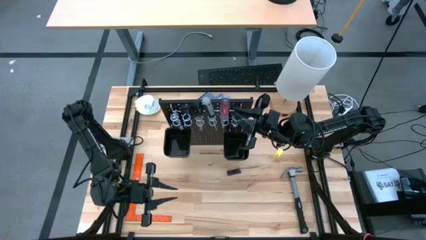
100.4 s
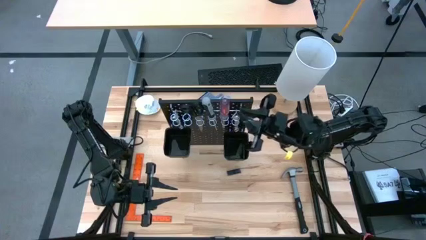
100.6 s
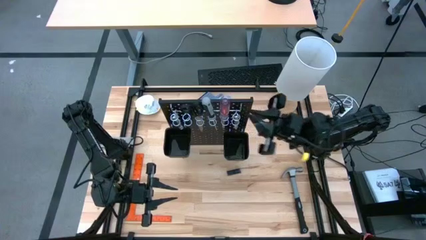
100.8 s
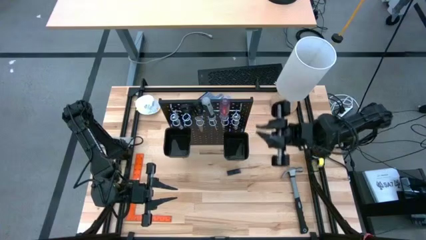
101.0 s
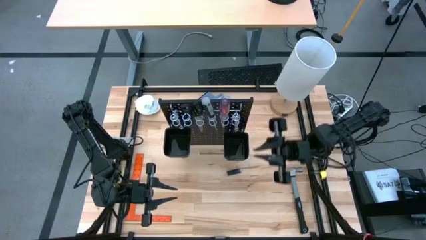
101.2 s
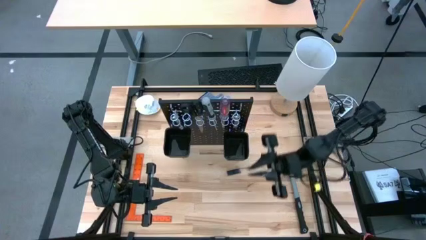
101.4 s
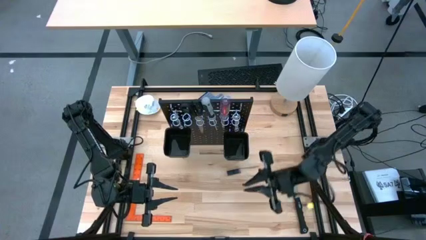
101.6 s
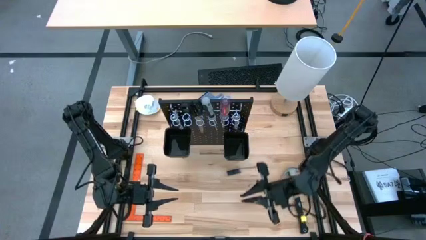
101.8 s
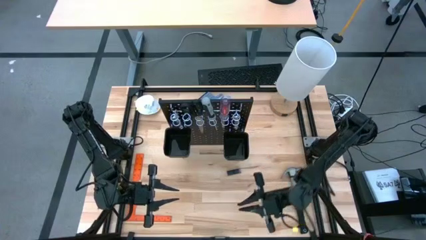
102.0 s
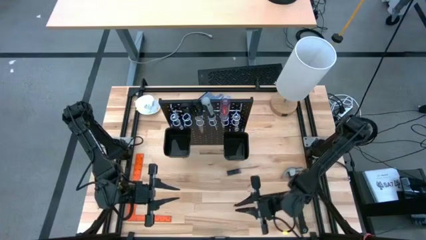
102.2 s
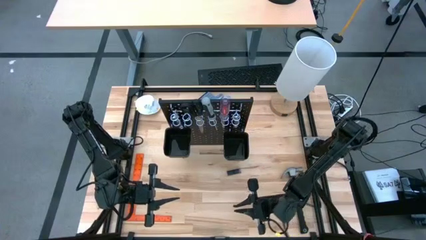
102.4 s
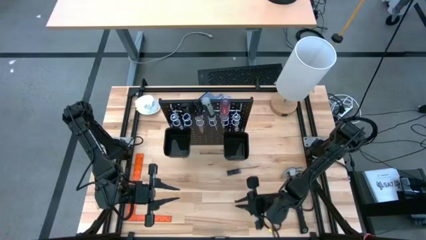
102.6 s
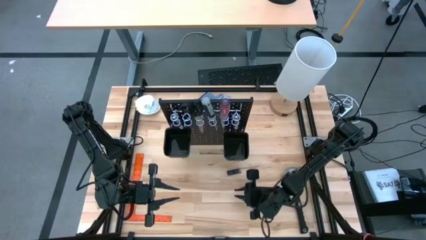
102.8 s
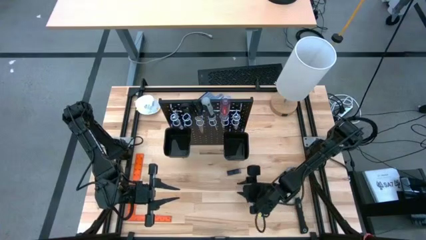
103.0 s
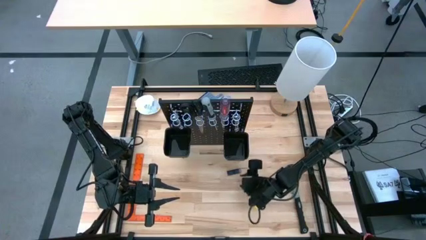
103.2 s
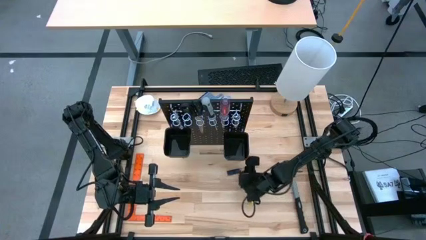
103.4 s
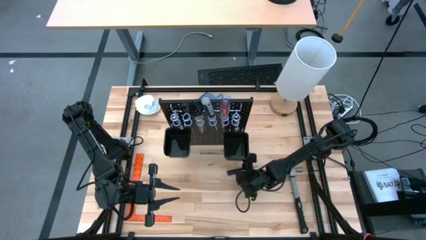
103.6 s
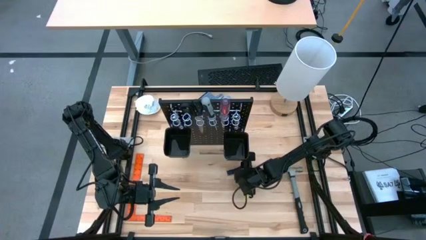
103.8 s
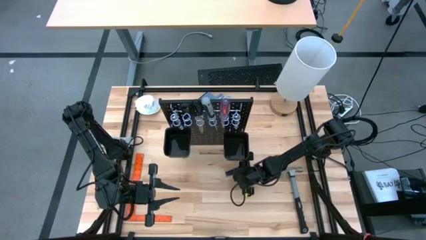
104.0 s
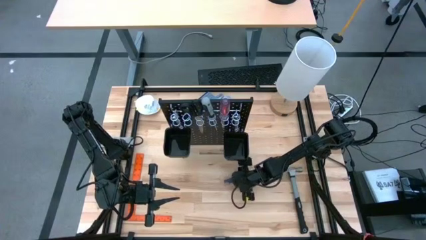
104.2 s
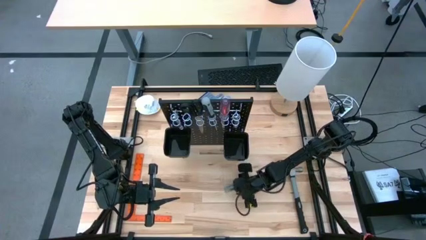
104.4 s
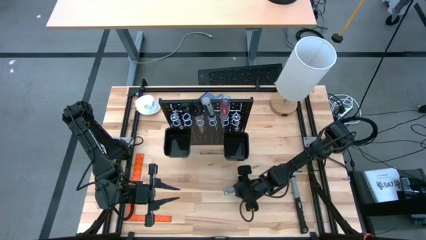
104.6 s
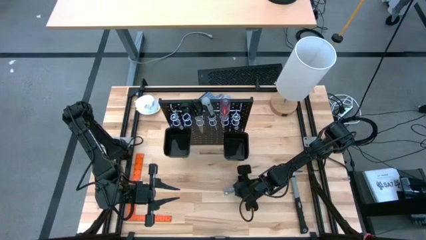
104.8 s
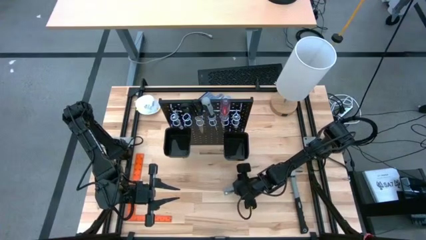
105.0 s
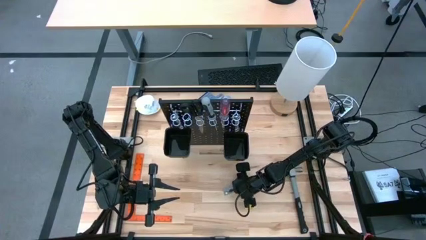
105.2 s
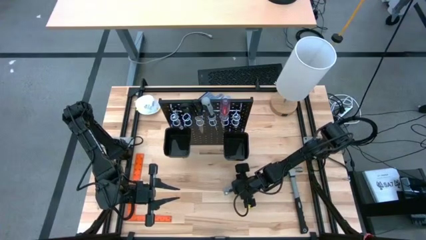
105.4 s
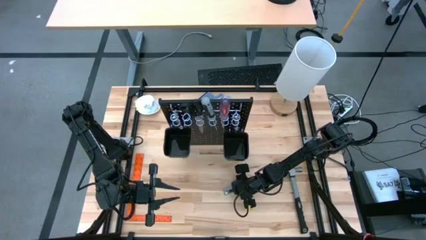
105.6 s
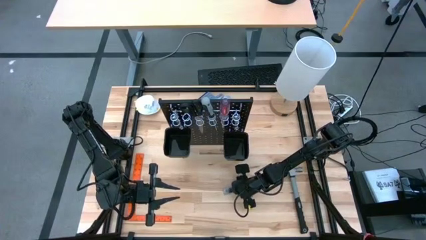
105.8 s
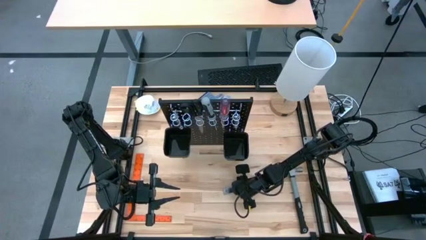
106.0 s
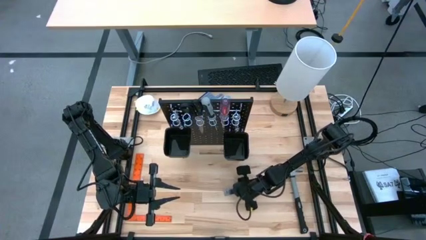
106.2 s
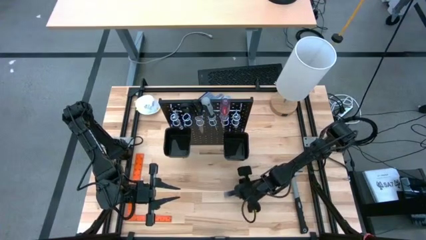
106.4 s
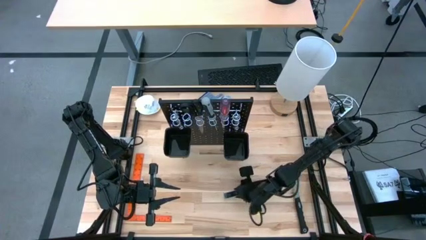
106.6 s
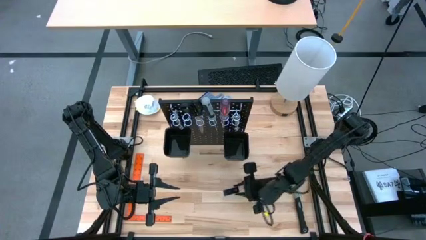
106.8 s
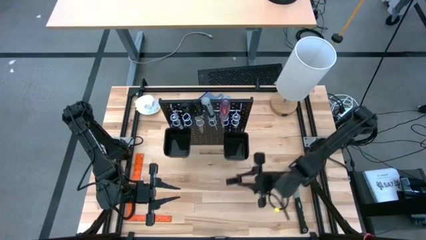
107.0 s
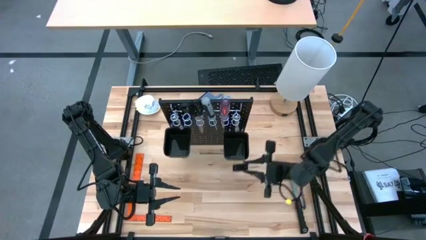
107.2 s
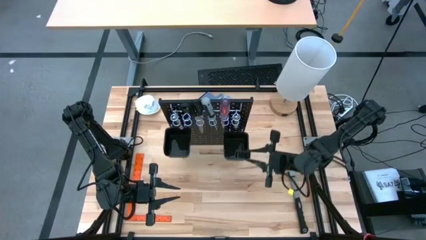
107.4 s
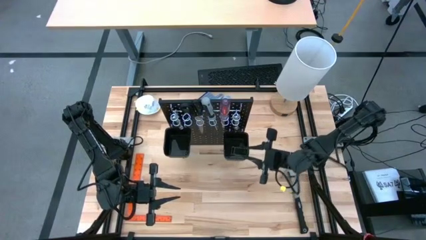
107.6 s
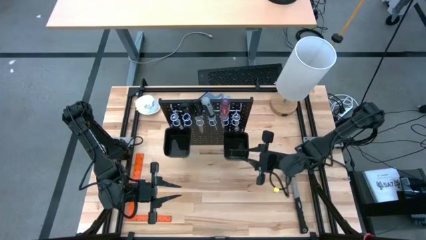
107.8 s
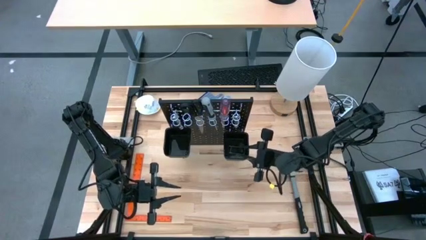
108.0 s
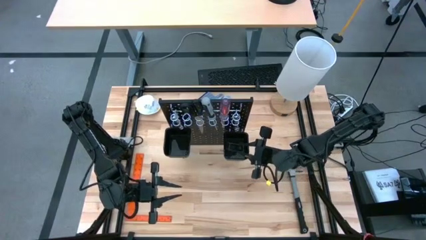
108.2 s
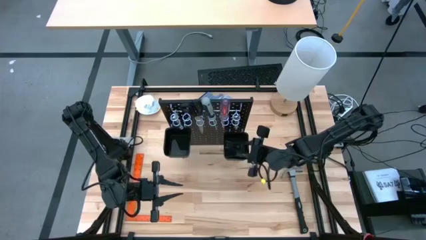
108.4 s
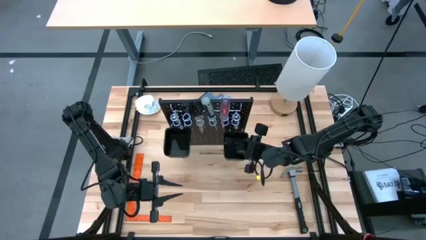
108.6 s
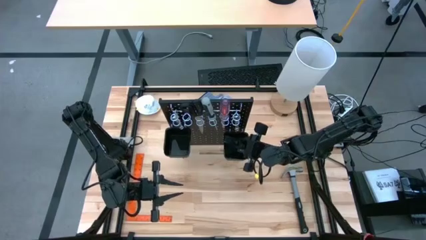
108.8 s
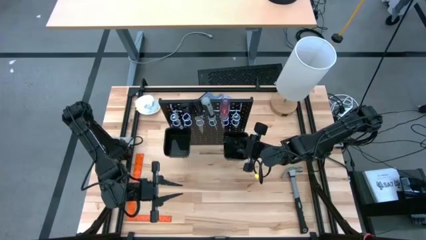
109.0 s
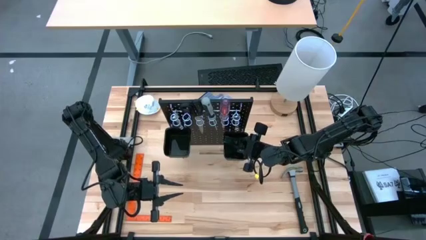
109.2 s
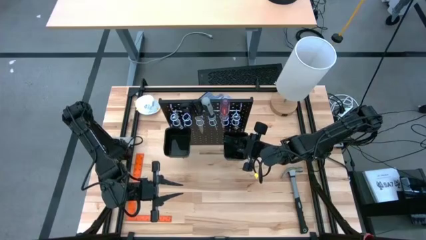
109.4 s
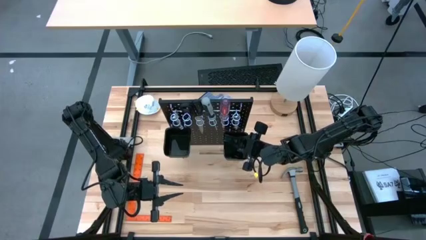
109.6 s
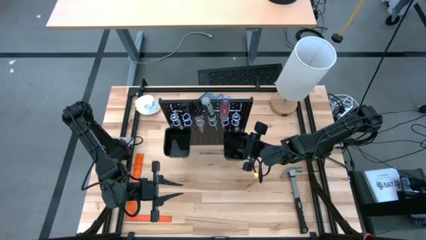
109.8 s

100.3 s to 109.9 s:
Task: Hang tools onto peg board
Put the black strip holder into the right black bin on the black pegboard

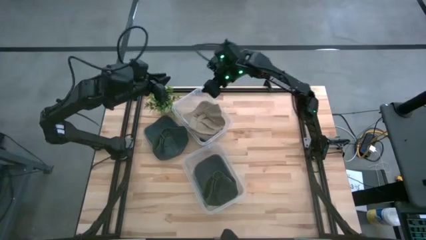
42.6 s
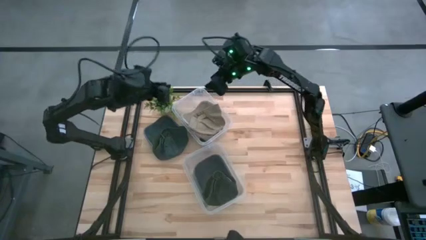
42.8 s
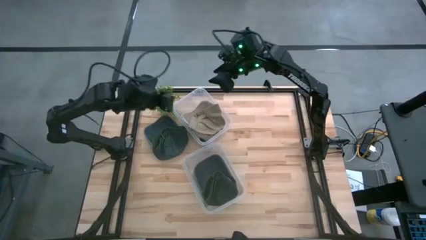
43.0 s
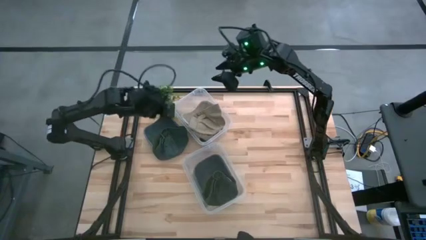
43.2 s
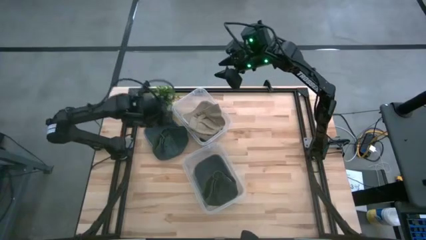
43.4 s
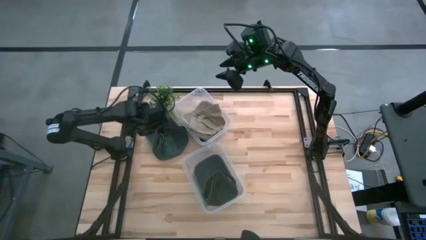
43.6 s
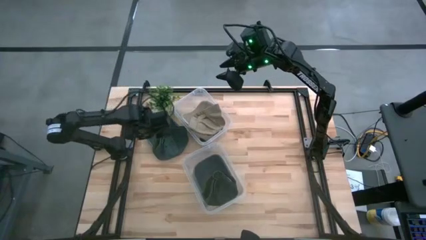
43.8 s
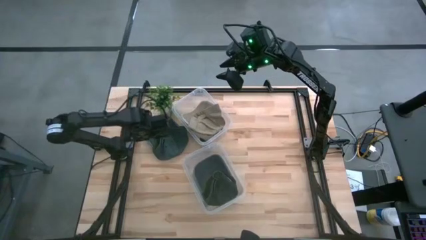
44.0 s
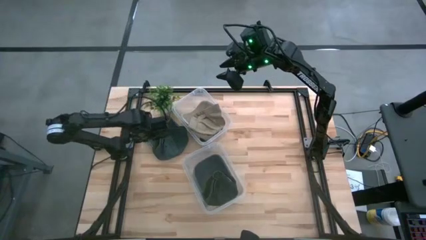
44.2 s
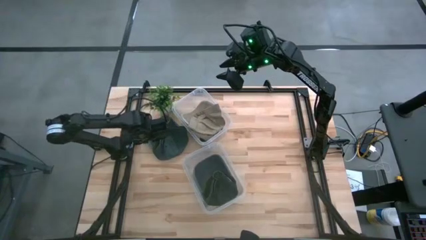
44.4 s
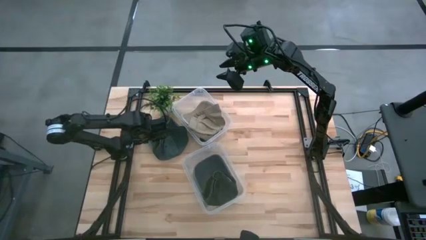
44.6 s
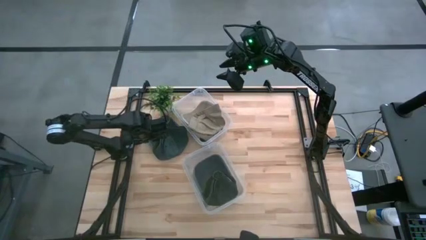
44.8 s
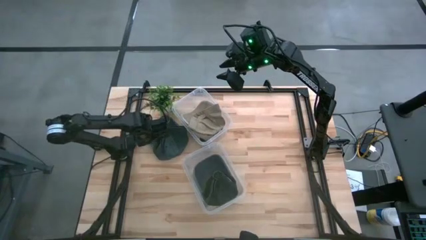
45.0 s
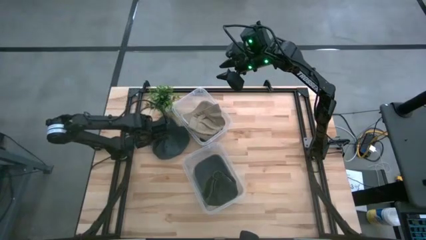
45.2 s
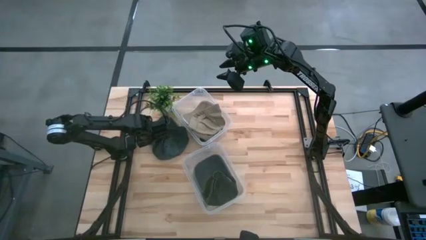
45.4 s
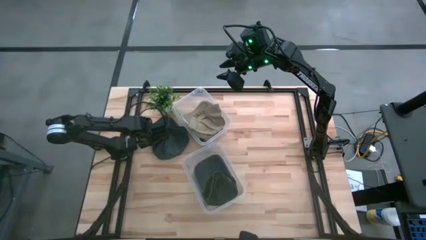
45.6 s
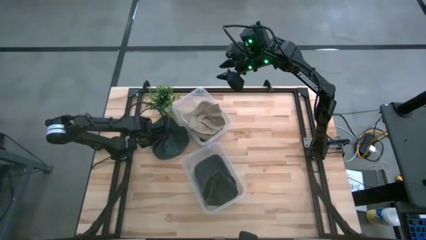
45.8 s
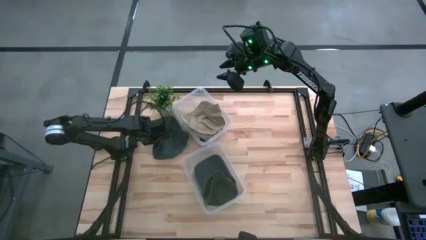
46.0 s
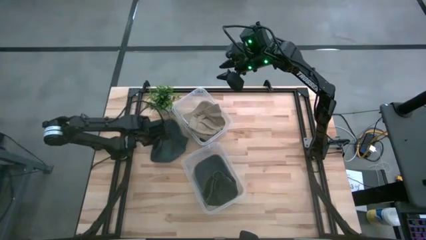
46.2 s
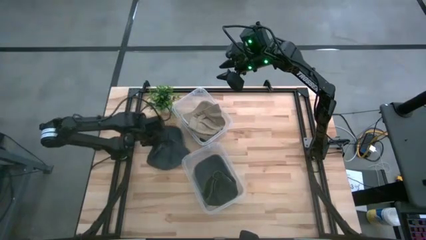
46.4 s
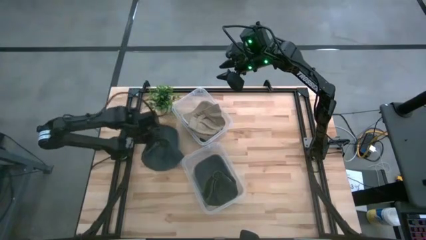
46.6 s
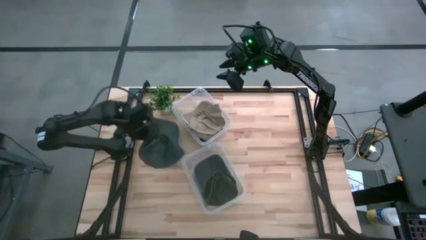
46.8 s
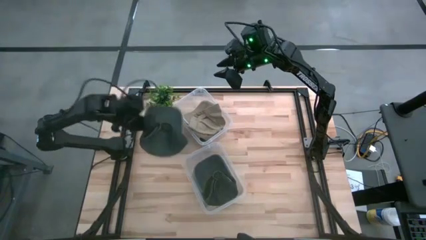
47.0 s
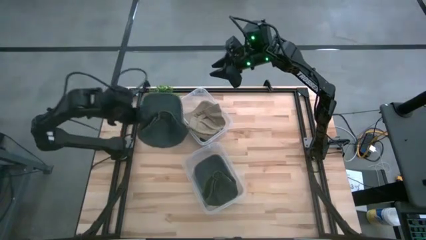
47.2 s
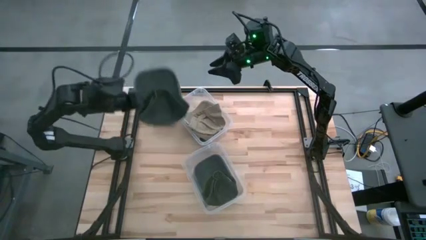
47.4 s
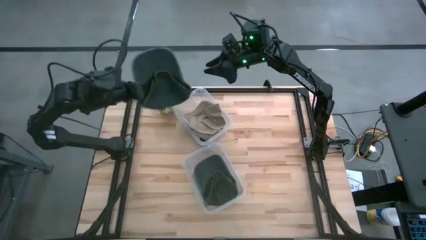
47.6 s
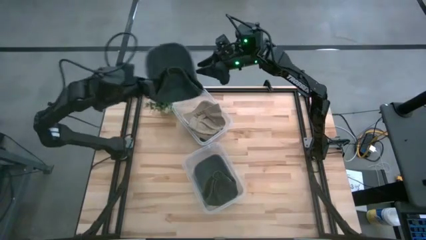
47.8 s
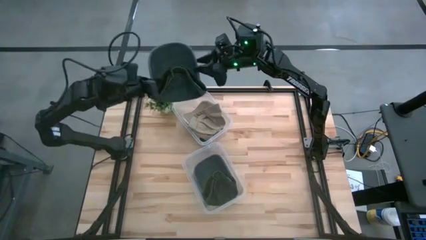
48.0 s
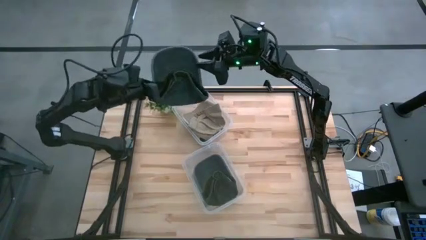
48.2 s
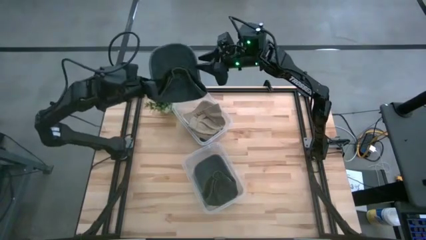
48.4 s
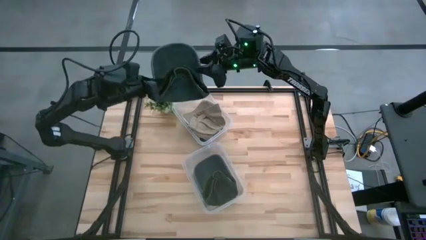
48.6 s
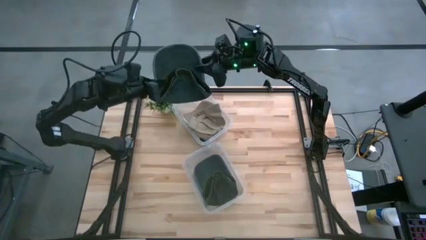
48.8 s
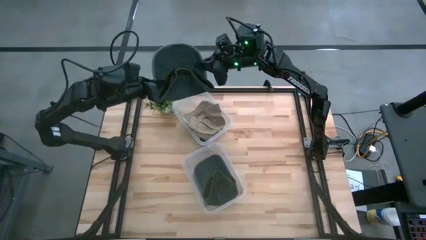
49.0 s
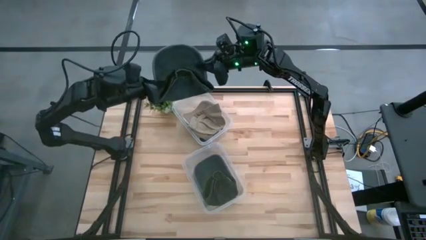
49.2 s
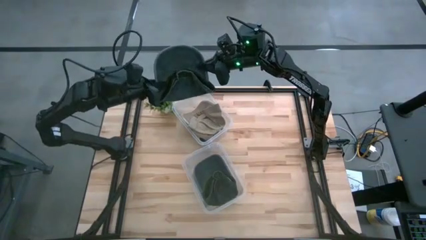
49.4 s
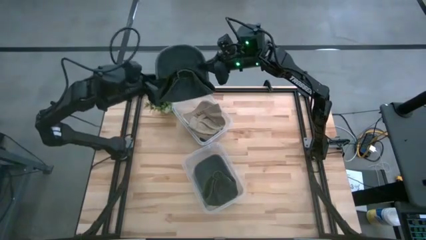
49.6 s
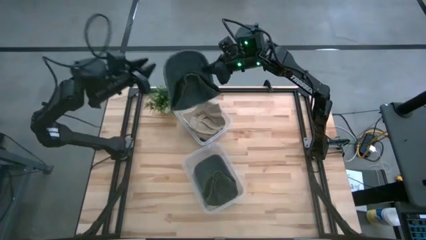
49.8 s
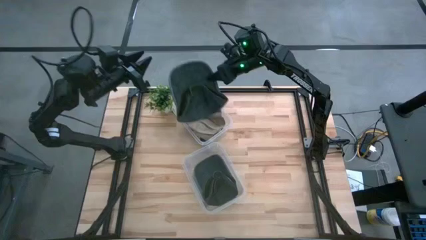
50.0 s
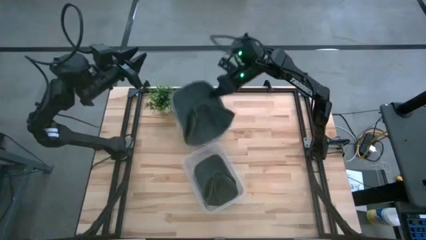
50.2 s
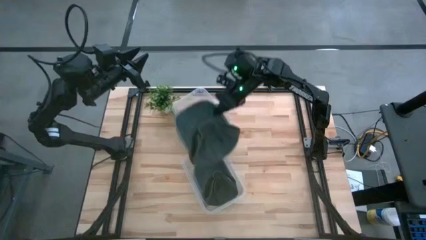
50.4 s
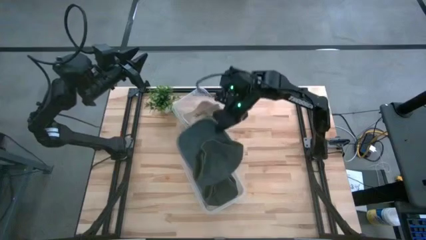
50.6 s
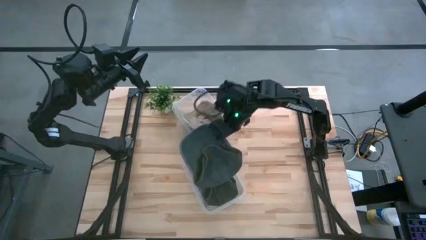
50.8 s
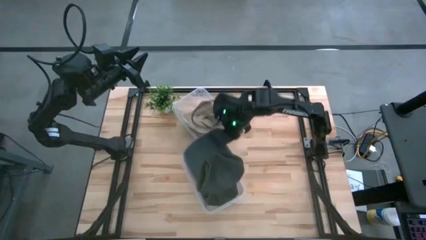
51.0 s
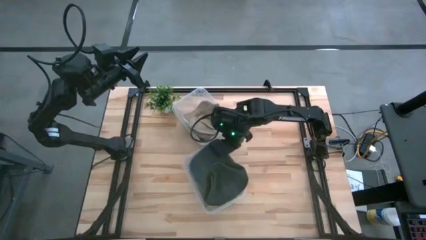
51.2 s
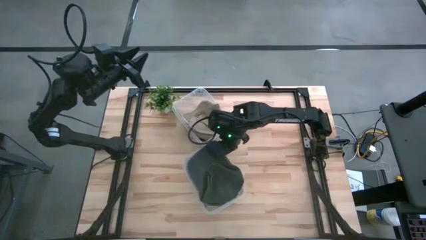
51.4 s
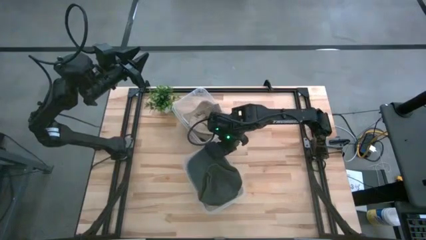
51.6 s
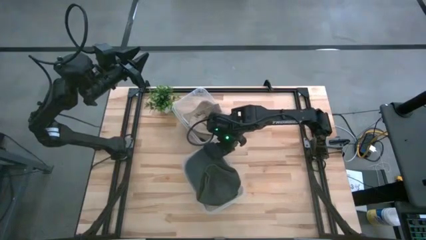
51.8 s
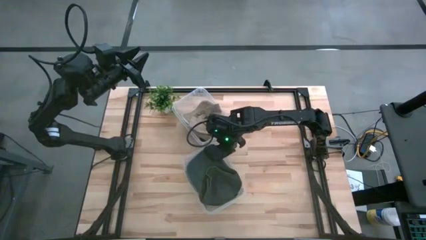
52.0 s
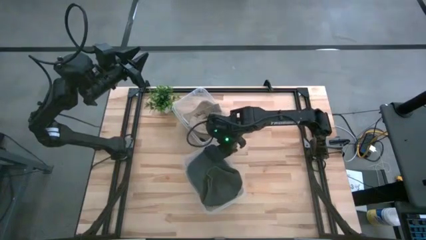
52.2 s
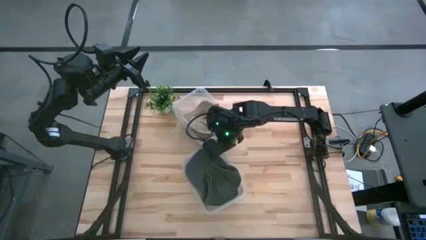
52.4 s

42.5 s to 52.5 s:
Task: Pick & Place hat
Put the black cap into the bottom transparent bin
